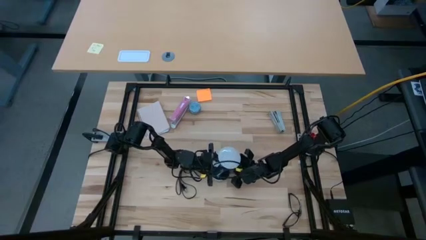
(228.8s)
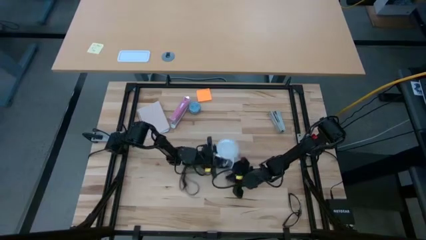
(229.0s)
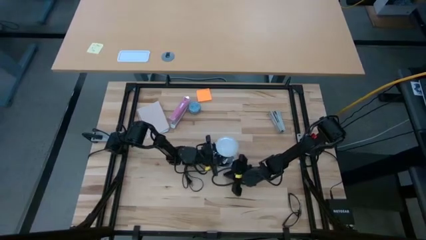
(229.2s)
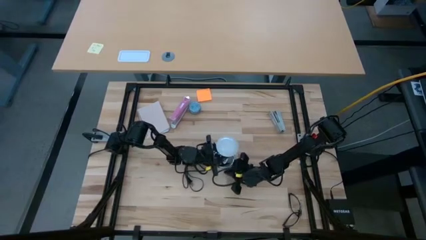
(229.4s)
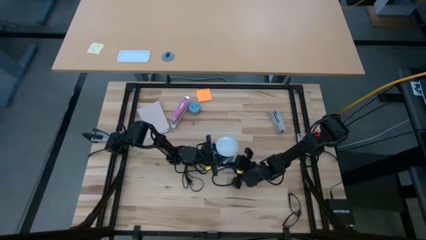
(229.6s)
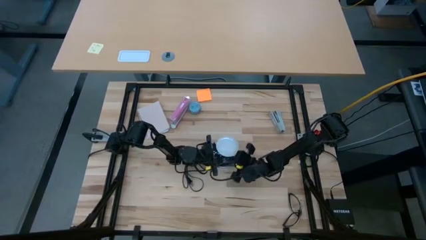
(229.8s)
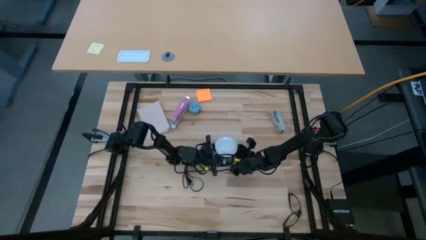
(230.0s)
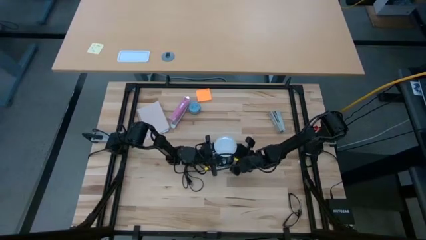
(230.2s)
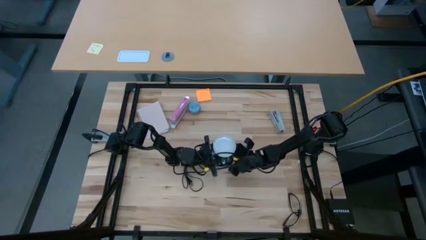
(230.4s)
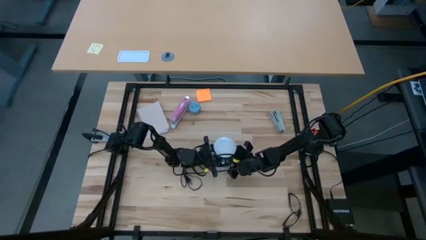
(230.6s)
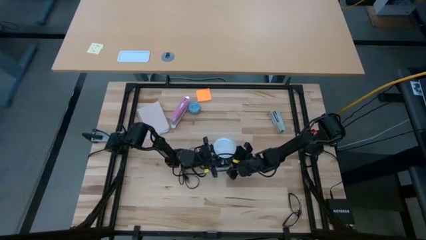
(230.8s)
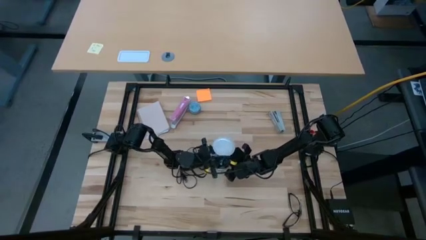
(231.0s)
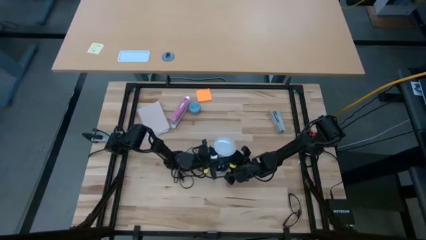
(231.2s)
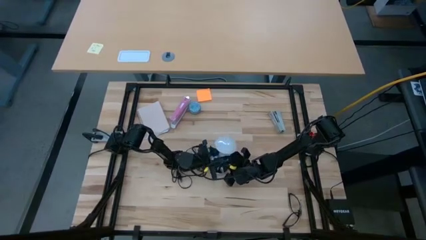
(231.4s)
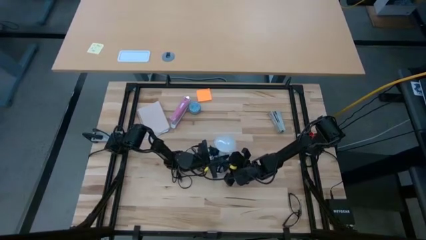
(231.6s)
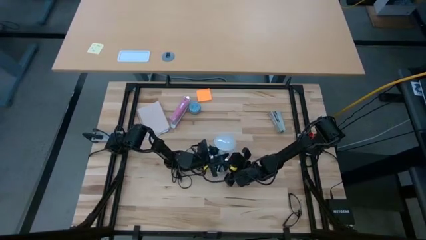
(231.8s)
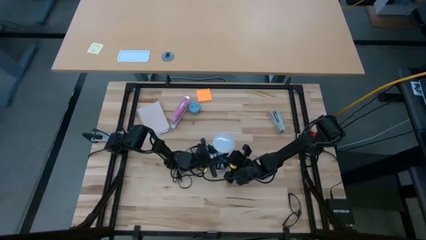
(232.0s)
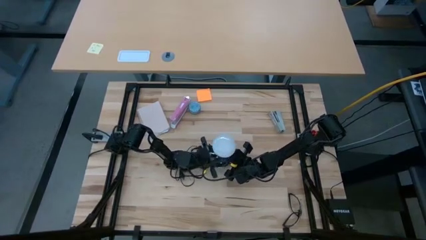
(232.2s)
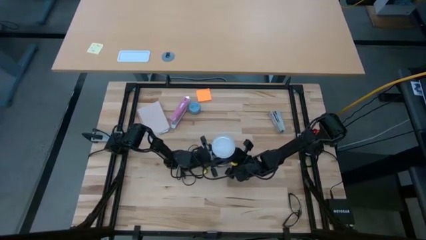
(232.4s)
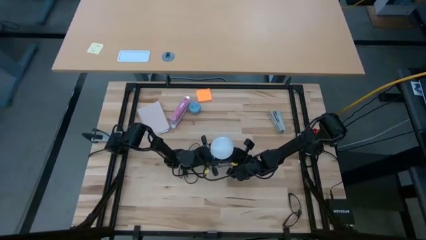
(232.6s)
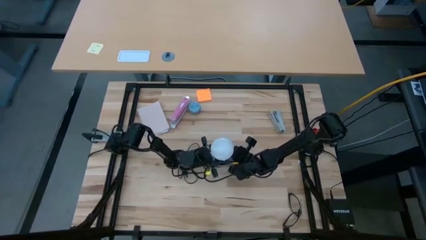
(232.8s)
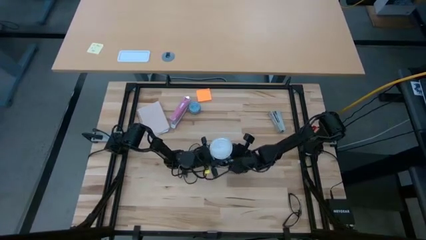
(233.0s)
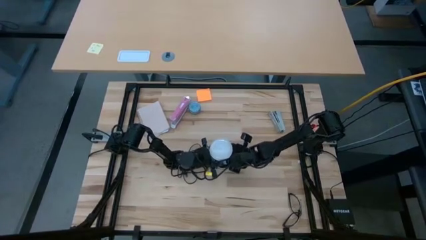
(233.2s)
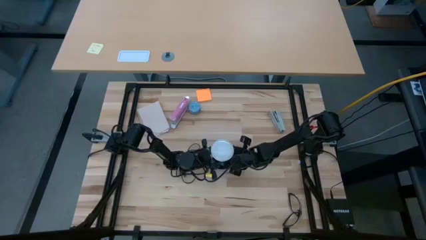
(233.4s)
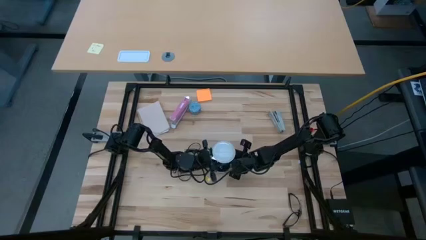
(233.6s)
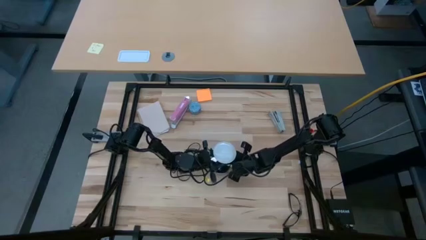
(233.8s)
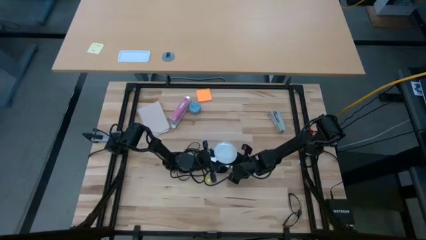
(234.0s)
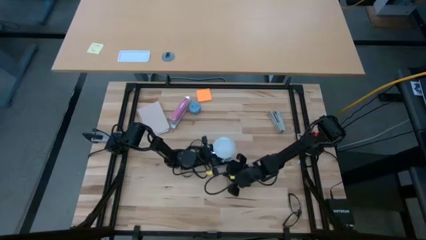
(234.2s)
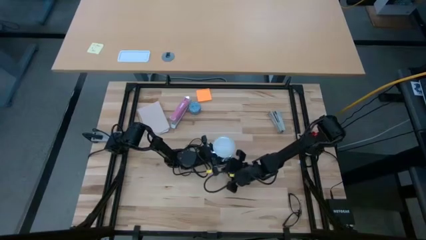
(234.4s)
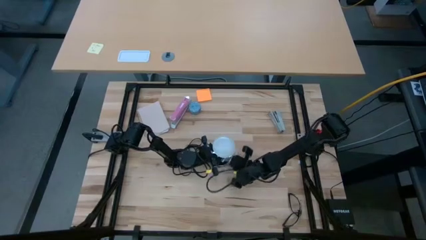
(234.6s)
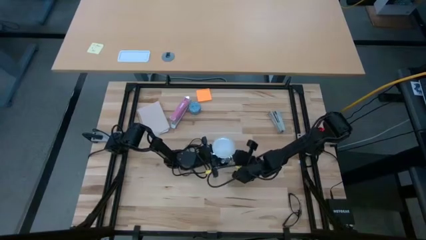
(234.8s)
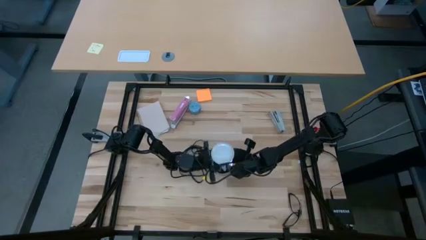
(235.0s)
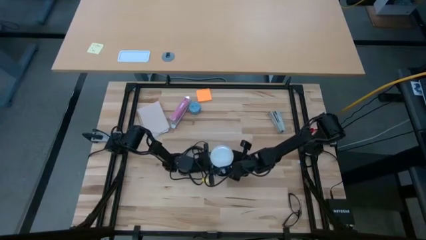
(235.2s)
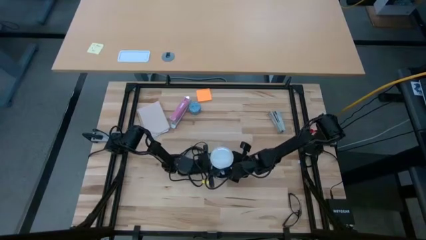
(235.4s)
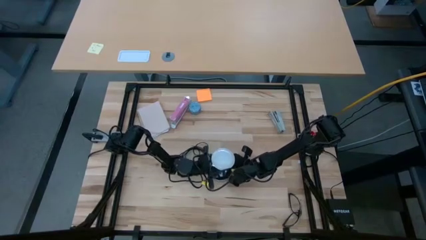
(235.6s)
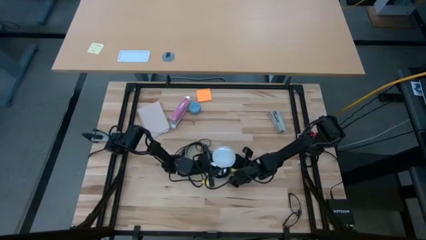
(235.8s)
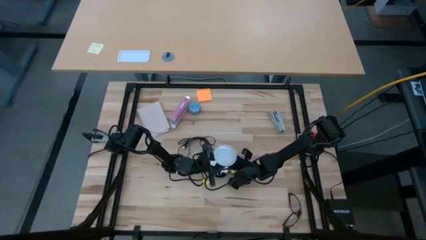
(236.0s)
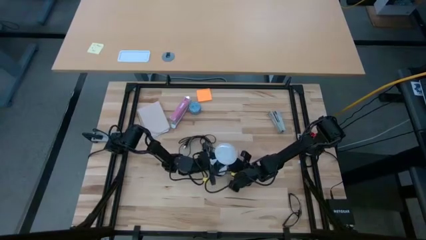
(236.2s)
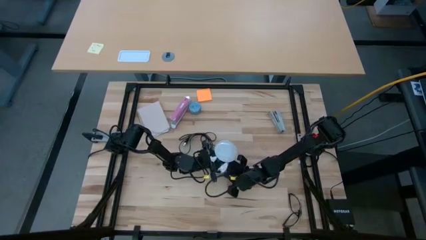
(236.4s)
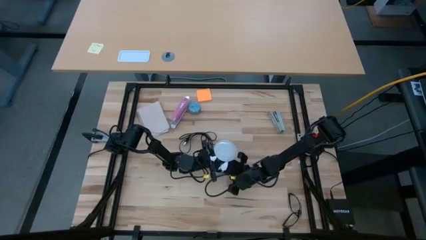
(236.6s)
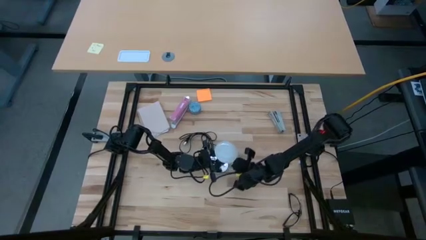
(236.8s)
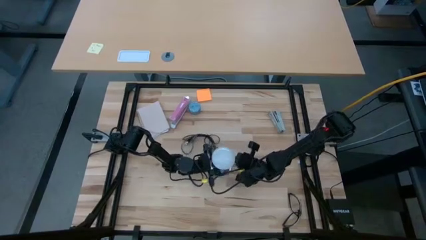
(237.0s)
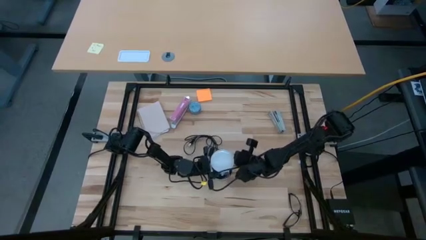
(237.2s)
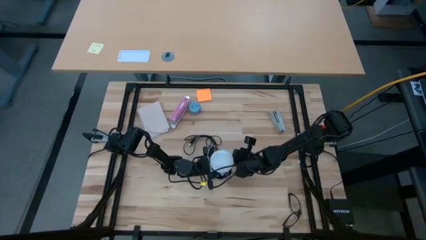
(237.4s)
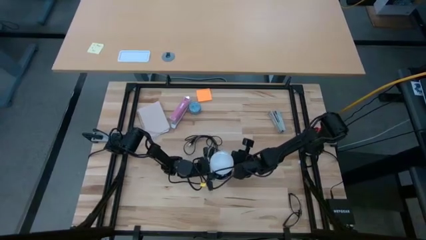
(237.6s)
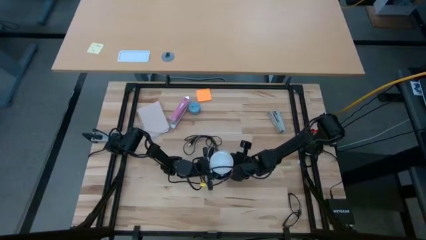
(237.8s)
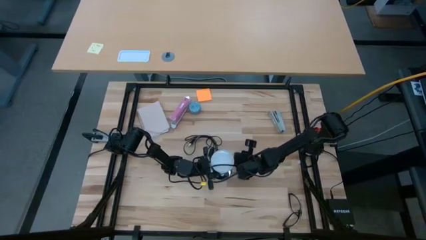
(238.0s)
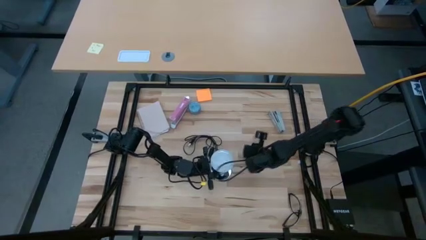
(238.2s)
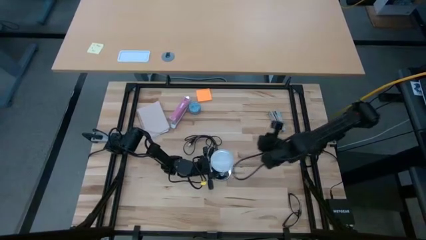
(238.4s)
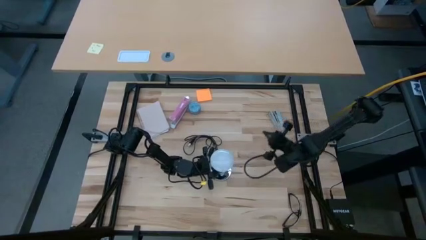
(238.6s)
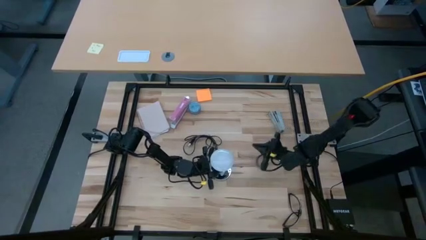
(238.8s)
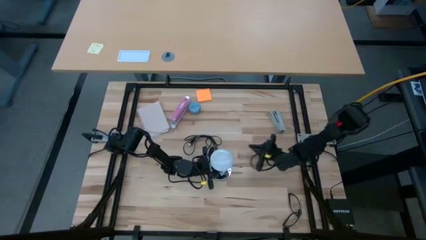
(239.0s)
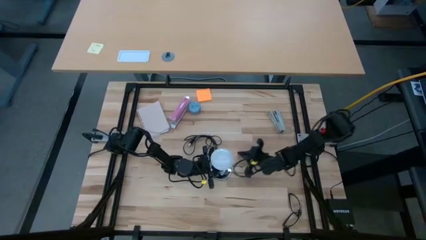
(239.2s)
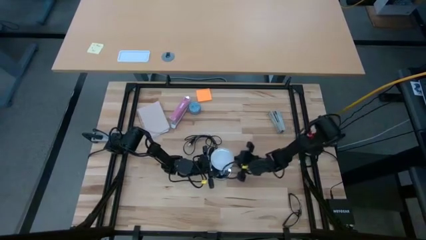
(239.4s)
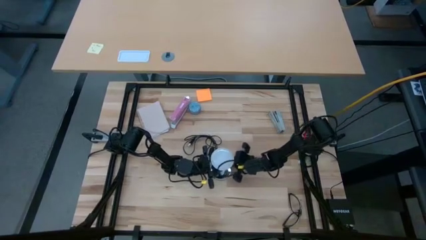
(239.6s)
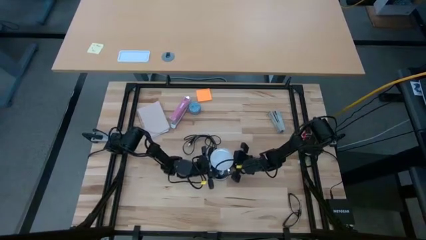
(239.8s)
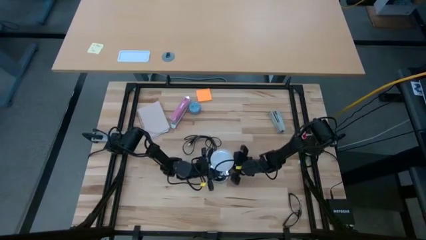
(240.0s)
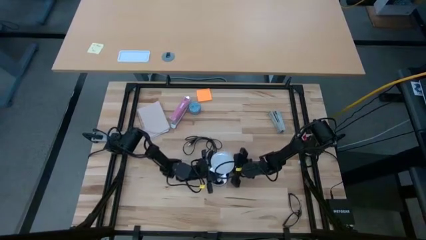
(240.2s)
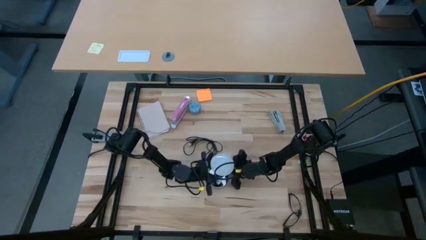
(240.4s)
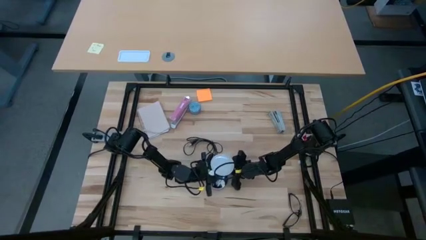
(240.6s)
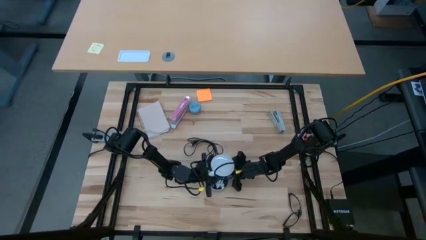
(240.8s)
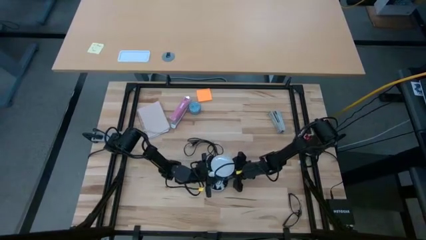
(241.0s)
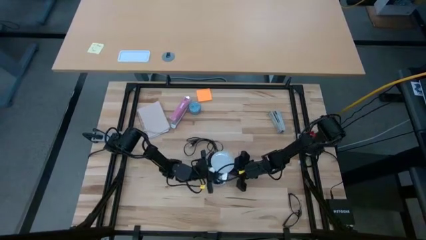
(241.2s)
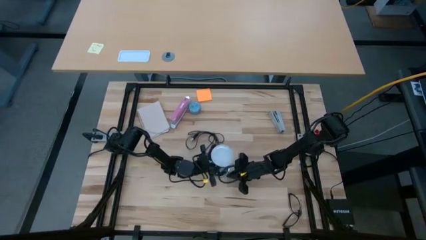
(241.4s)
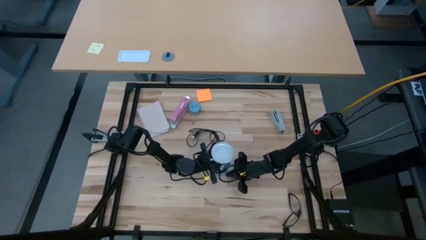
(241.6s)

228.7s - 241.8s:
Task: Screw lightbulb
Remove the lightbulb from the lamp

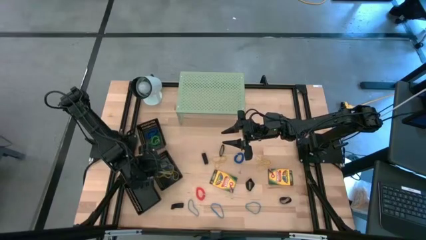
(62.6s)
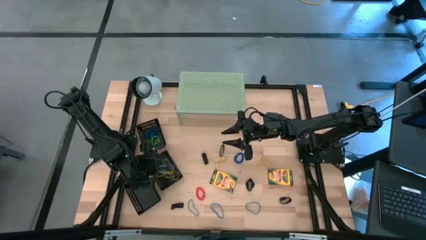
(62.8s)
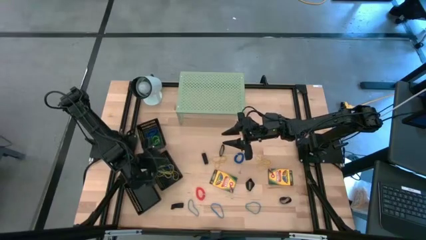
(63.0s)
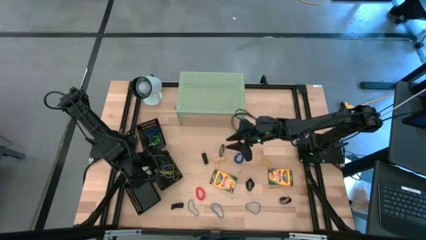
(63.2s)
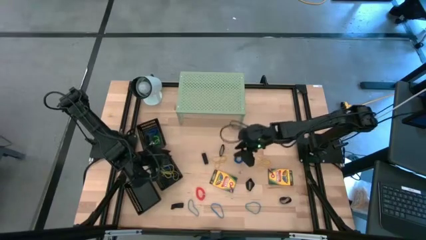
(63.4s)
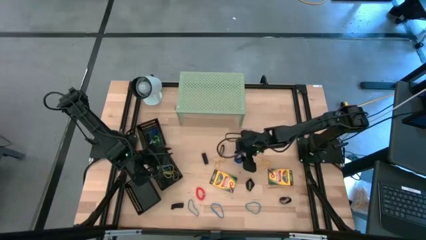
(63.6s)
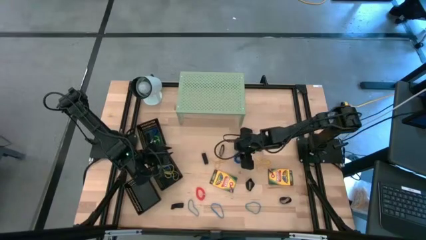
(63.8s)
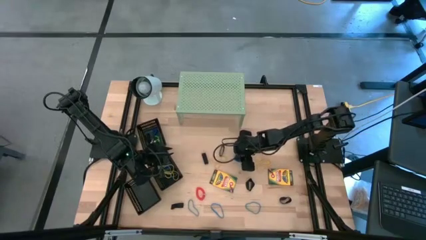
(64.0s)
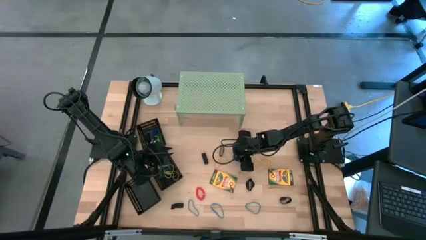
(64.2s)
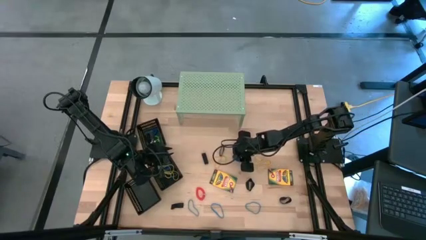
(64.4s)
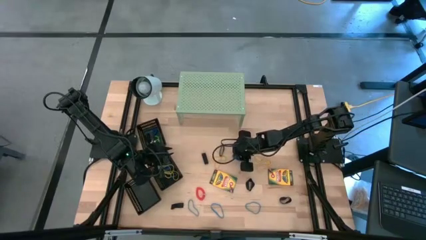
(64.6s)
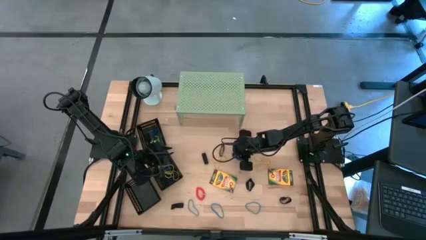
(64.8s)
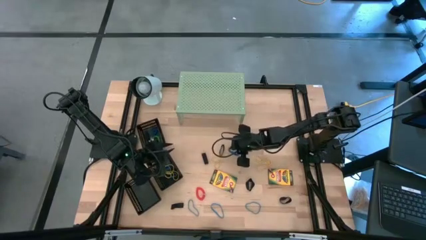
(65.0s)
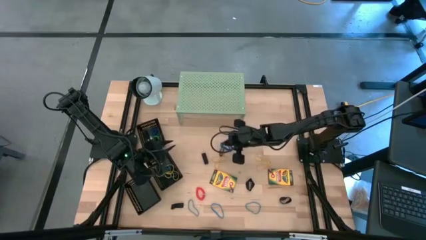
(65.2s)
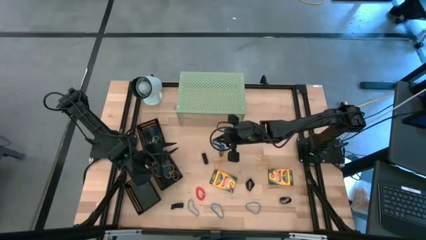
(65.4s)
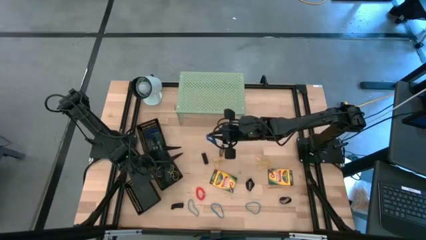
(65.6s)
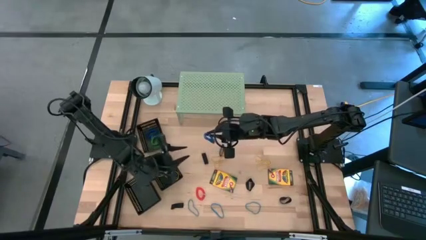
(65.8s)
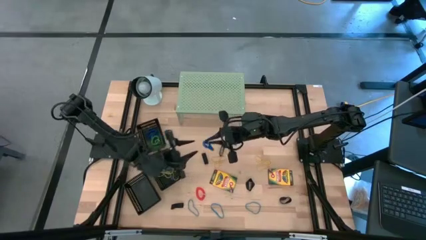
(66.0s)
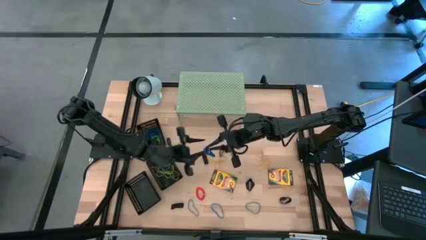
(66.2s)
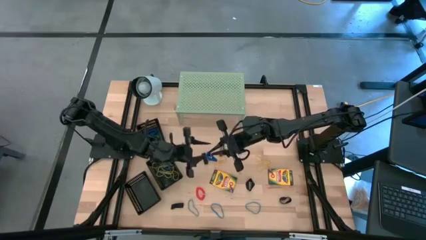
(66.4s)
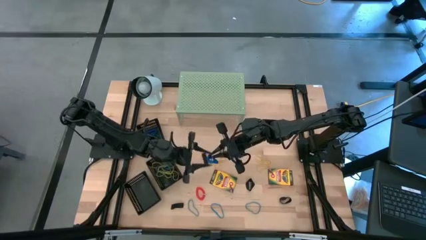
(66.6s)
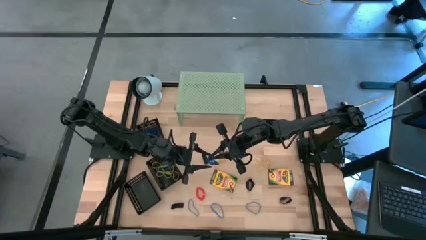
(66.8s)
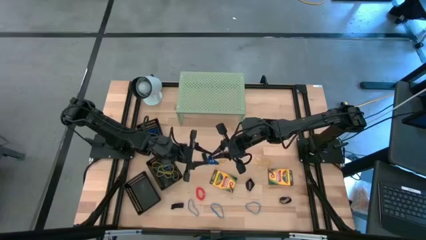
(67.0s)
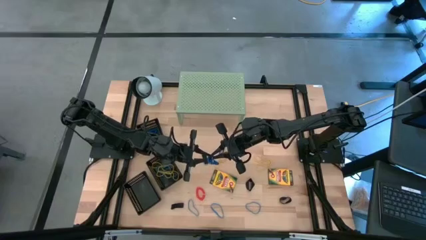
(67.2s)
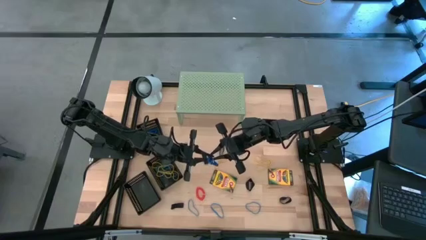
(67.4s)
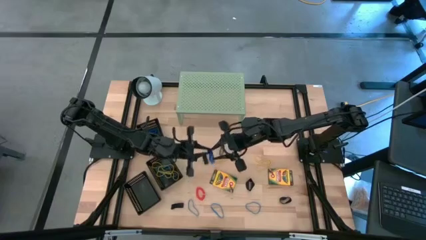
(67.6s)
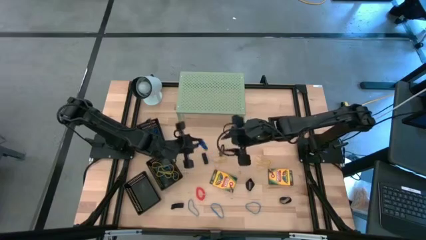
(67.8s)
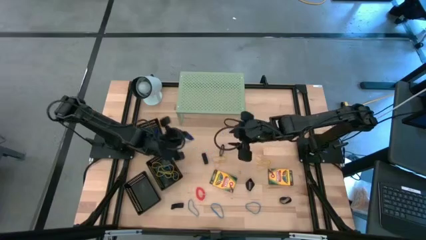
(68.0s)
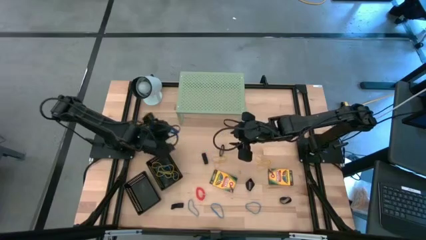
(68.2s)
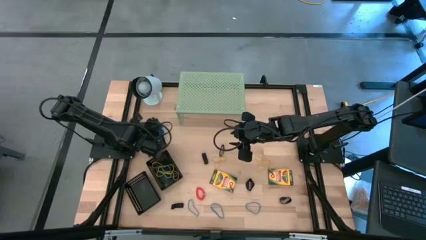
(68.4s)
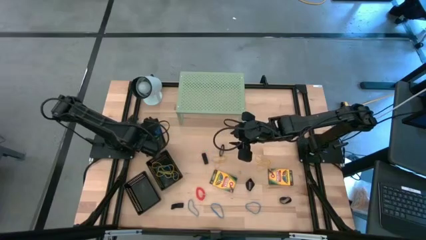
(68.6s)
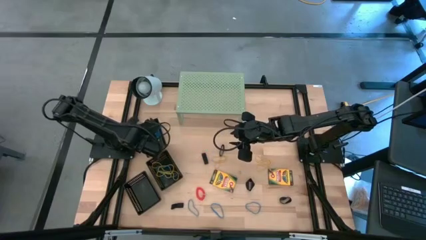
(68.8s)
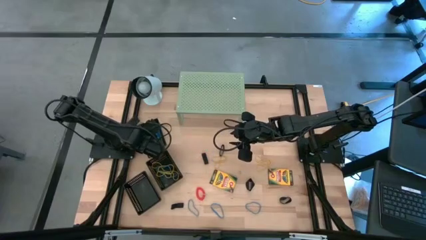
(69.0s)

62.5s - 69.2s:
Task: Pick & Place Office Desk Supplies
Put the blue spring rubber band into the top black bin
